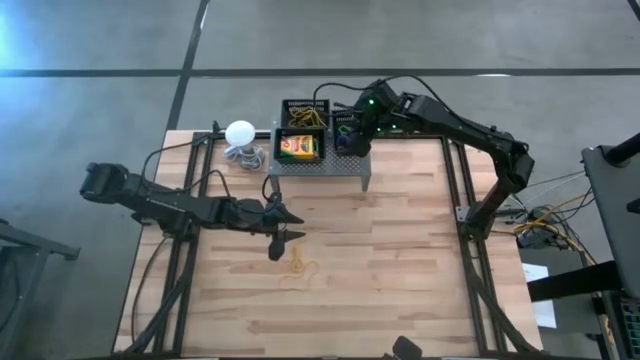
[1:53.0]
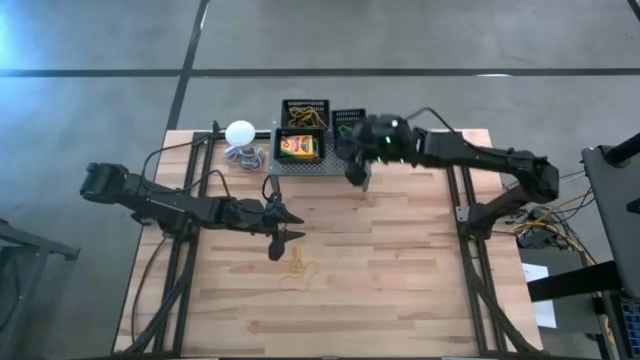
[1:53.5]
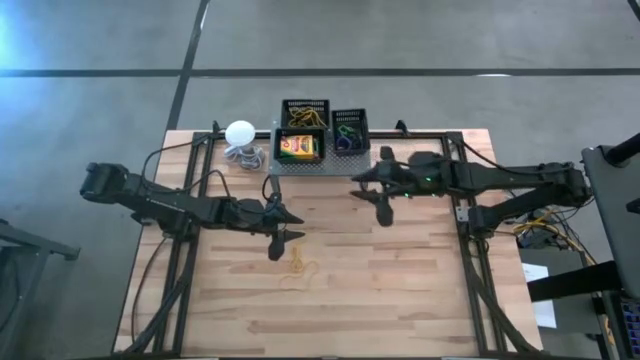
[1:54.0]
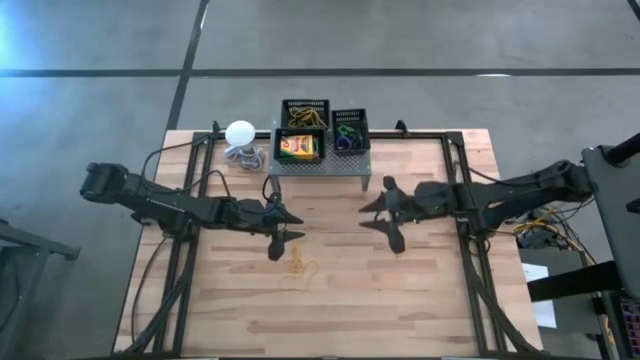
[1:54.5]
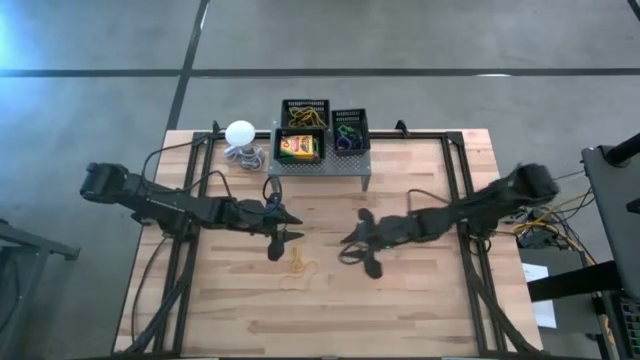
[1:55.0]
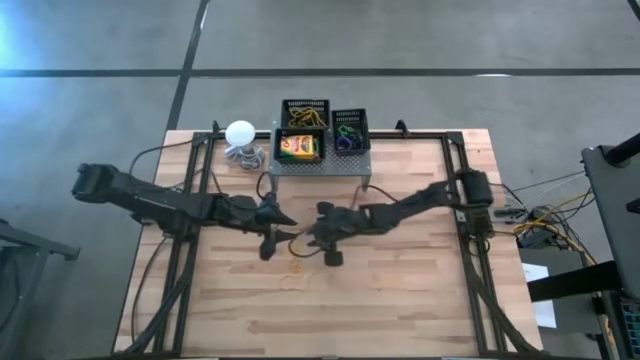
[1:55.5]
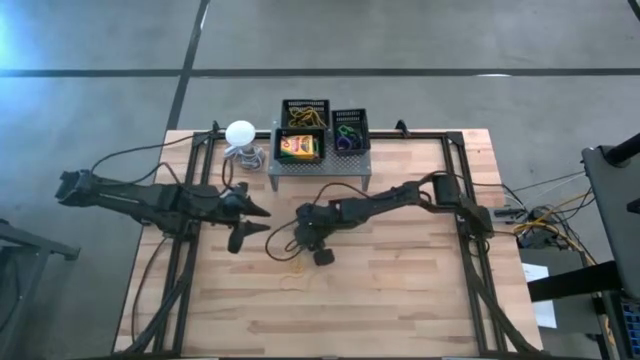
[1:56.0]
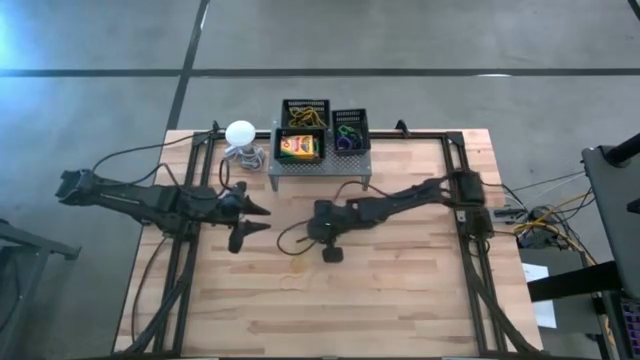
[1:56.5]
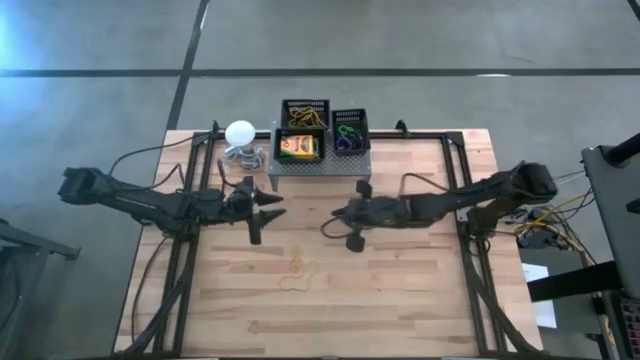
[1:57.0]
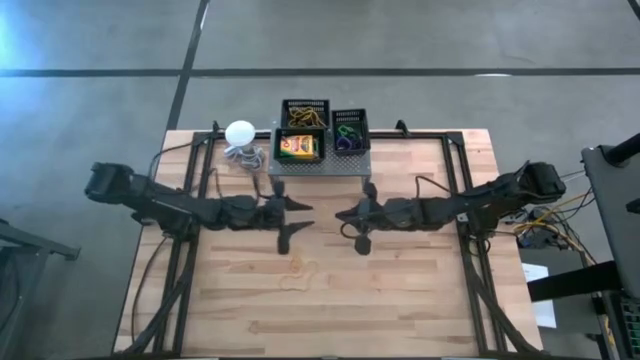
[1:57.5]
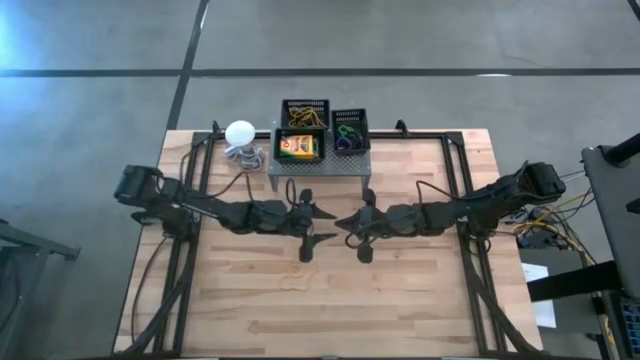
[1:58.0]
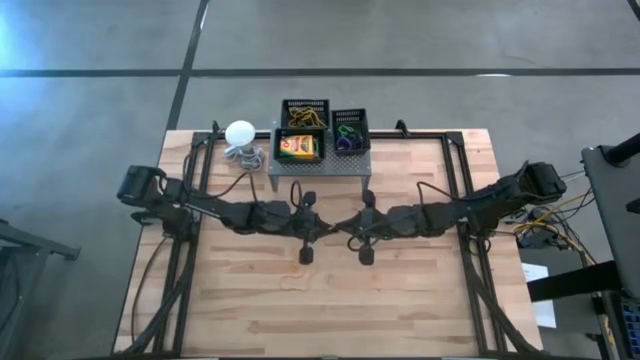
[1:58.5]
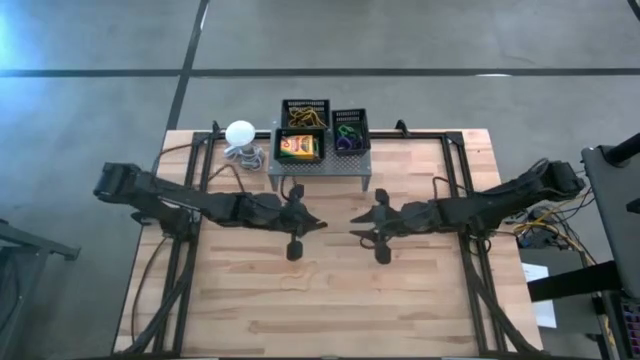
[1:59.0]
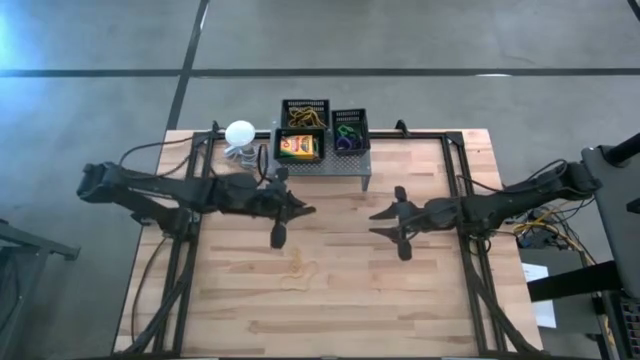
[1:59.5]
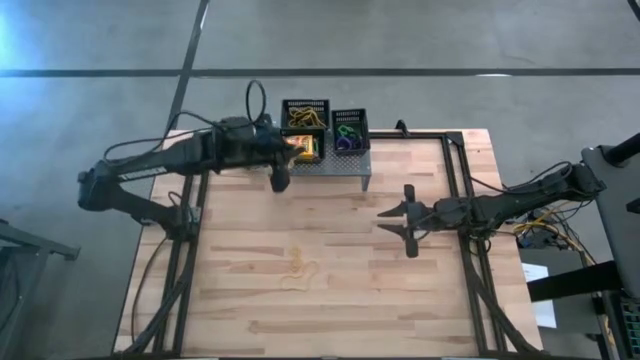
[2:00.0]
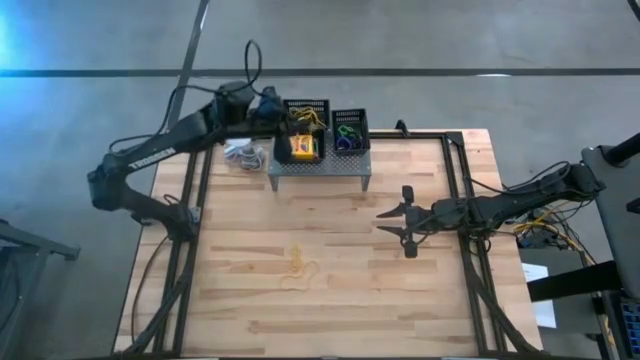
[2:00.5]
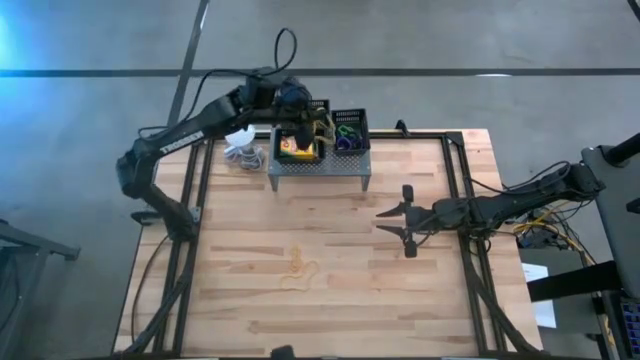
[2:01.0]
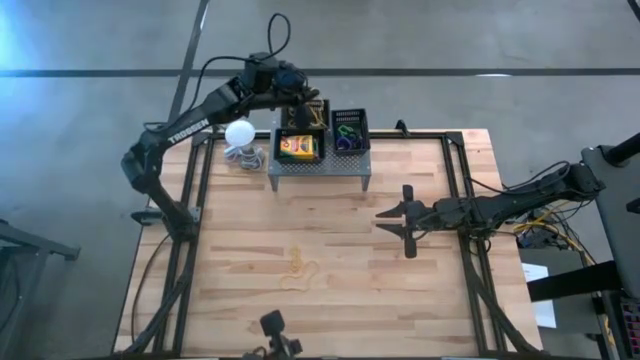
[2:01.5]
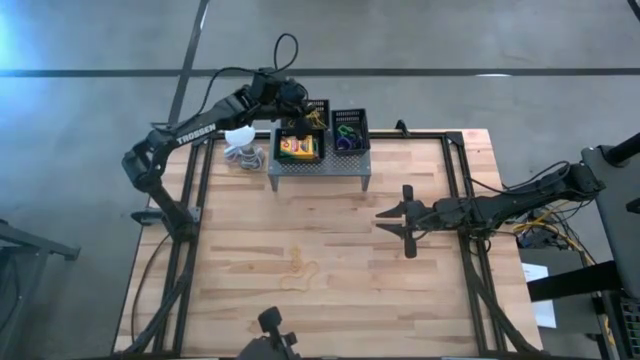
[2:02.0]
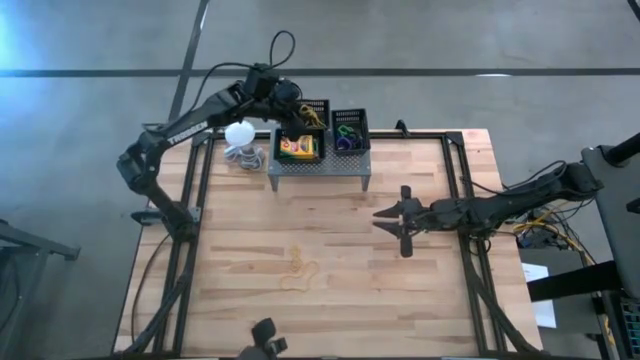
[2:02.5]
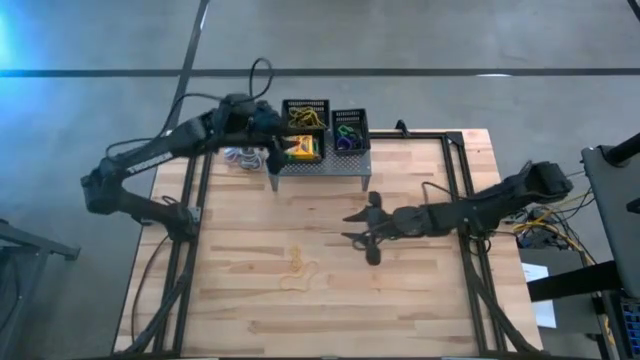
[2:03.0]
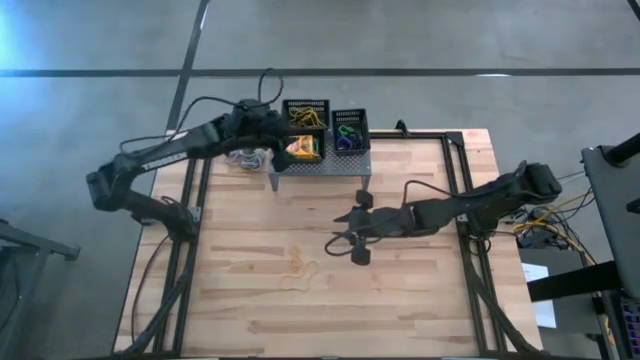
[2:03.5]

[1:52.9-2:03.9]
Task: Pick & Place Office Desk Supplies
Put the yellow rubber band into the top left black bin on the shelf

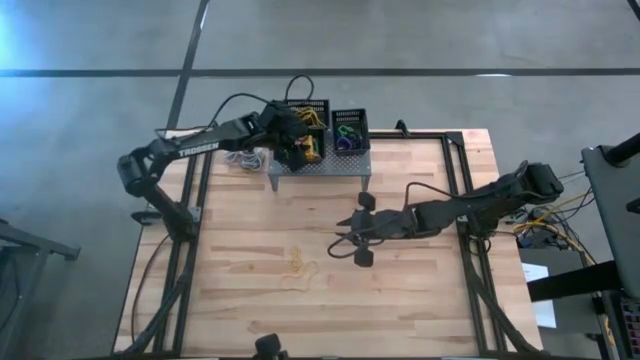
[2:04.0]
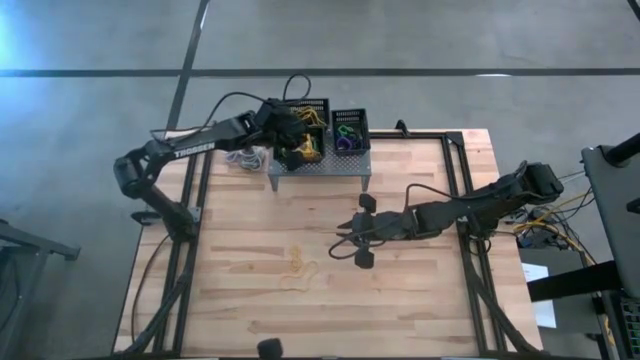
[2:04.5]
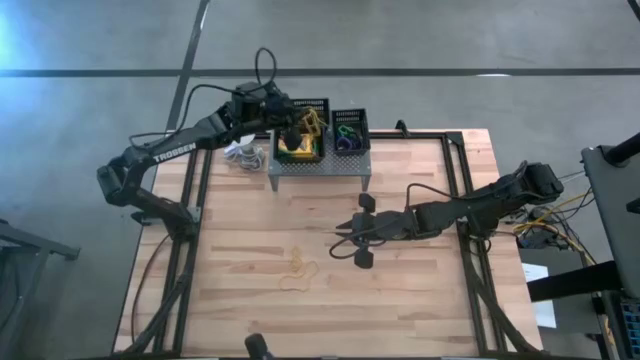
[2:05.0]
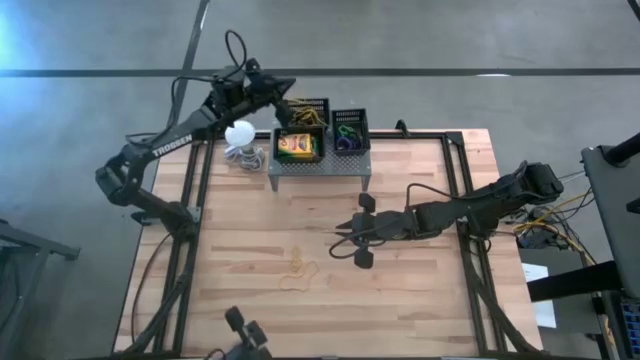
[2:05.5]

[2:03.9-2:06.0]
Put the yellow rubber band into the top left black bin on the shelf

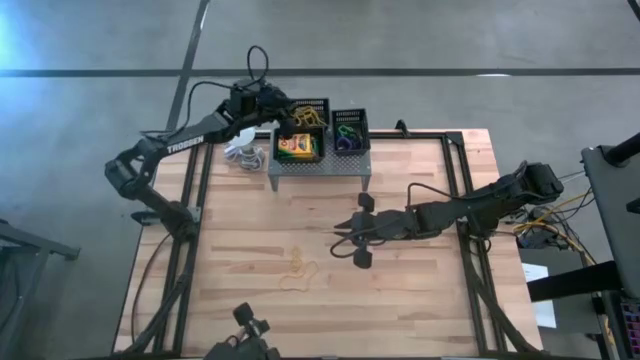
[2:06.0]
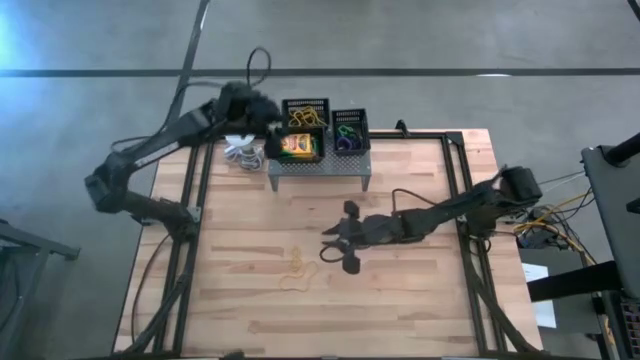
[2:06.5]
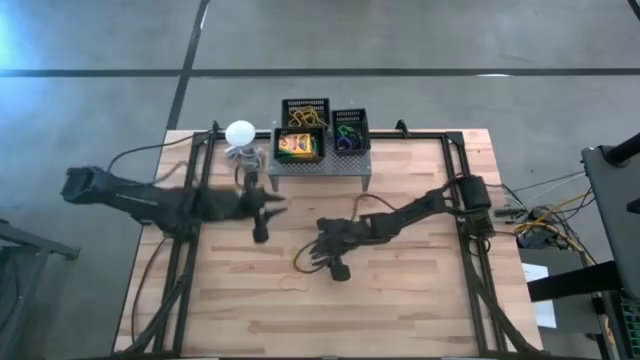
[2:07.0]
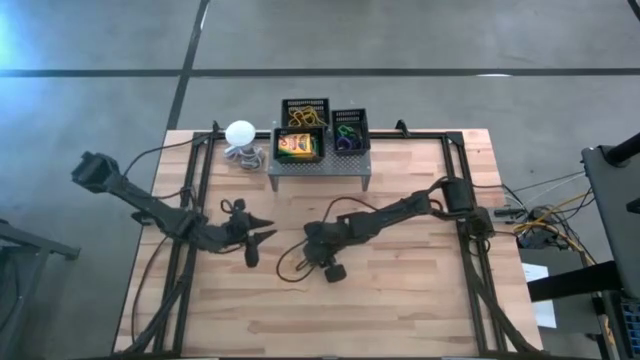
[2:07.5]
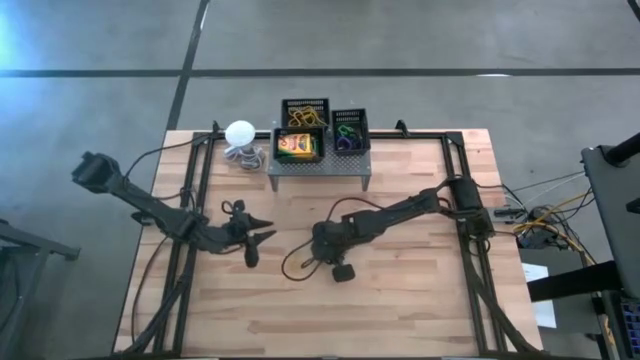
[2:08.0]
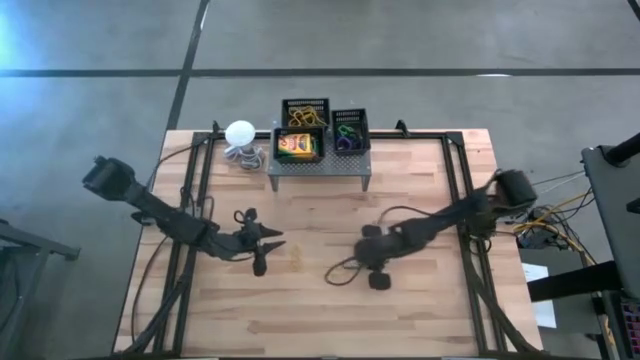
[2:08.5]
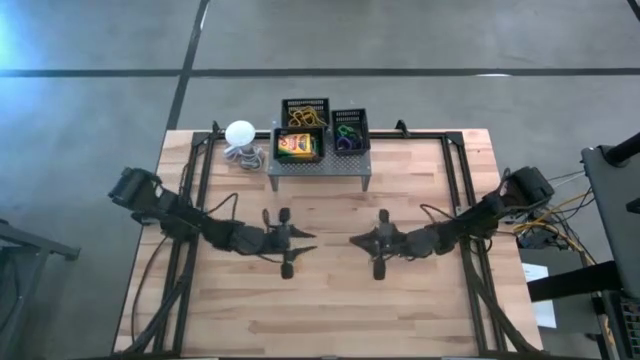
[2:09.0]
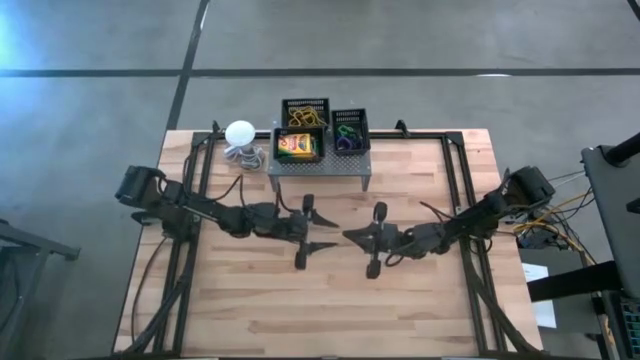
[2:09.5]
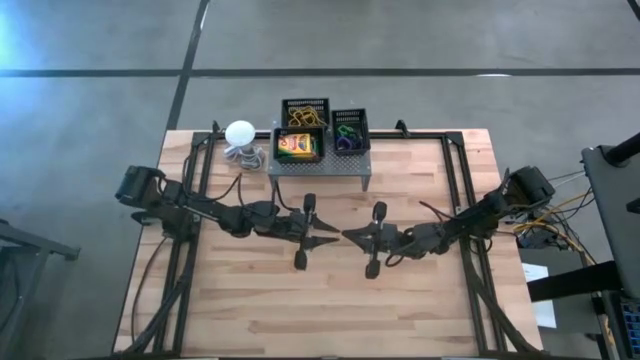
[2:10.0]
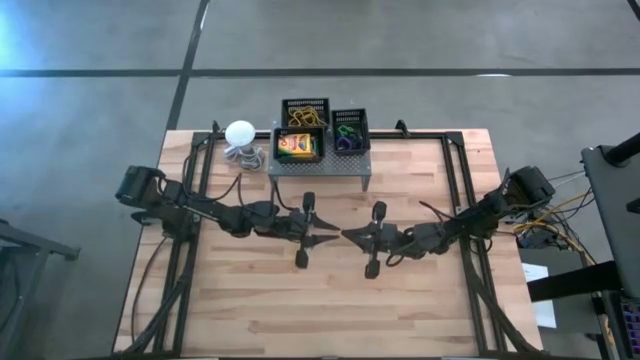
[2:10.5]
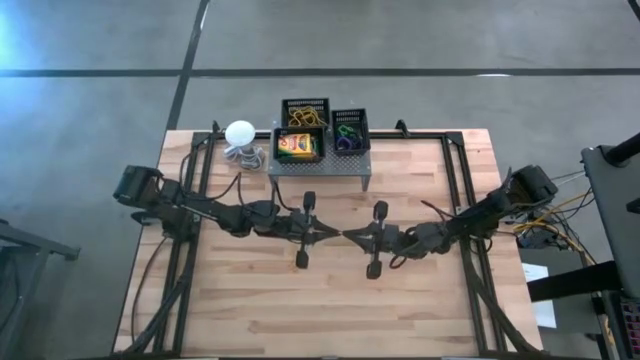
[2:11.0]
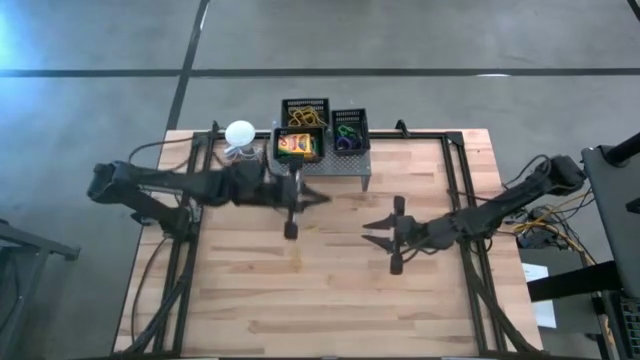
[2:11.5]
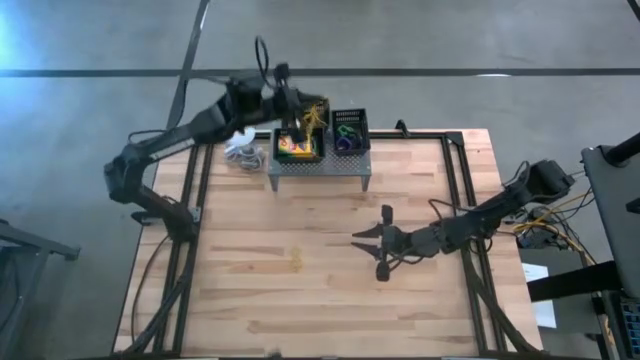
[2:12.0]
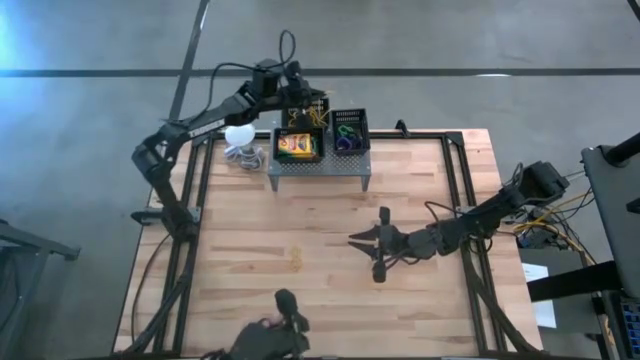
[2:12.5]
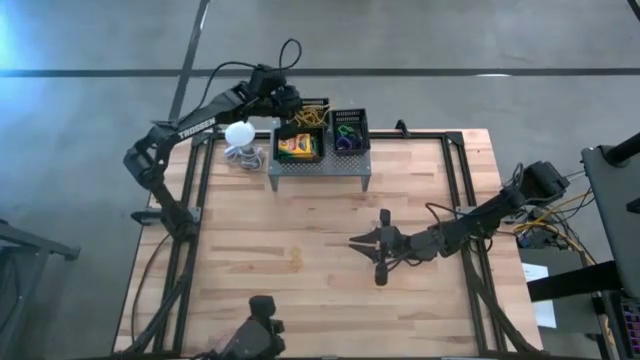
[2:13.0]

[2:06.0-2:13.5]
Put the yellow rubber band into the top left black bin on the shelf

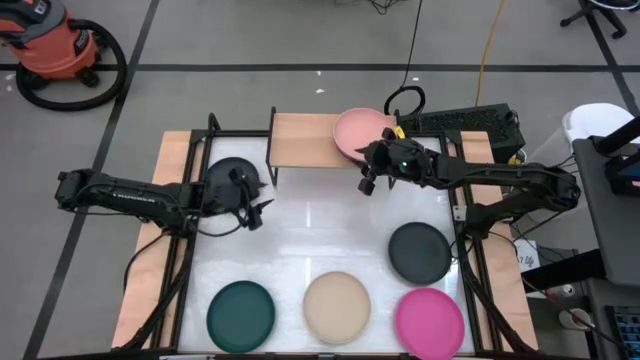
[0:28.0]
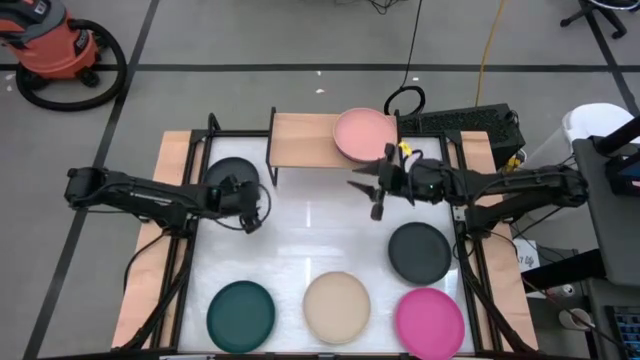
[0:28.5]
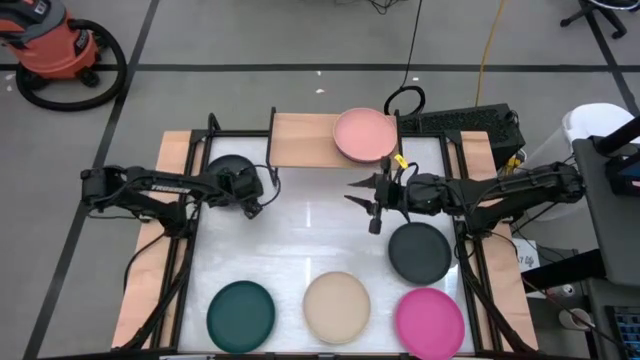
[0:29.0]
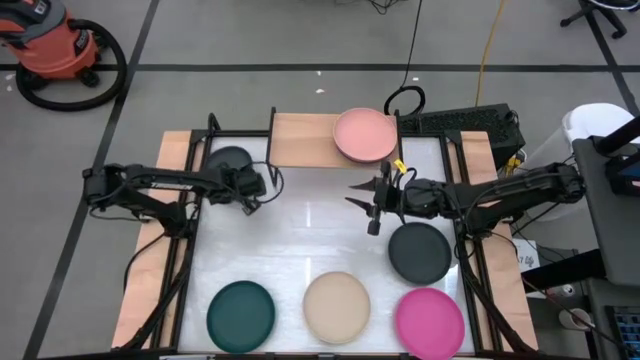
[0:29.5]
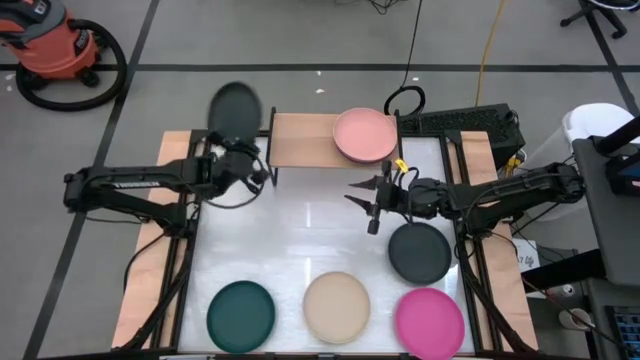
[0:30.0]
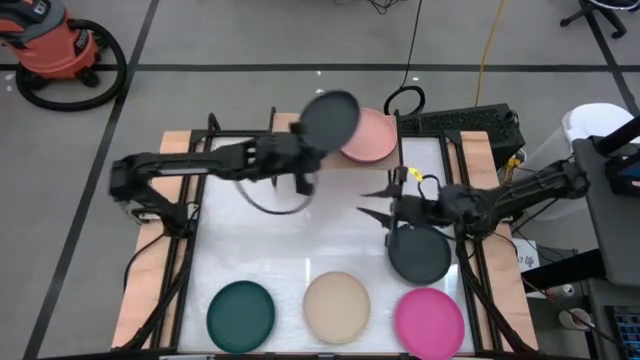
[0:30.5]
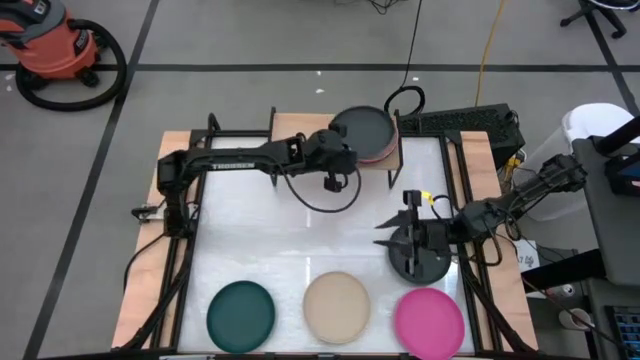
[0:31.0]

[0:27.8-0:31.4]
Task: Place and stack plates onto a shelf
Stack the top black plate on top of the light orange plate on the shelf
